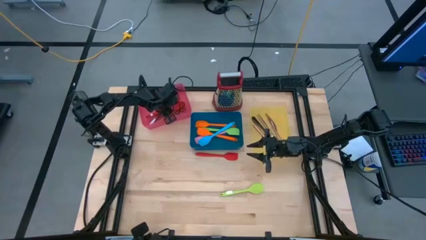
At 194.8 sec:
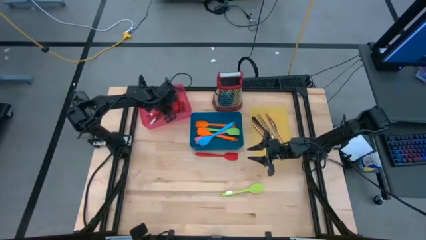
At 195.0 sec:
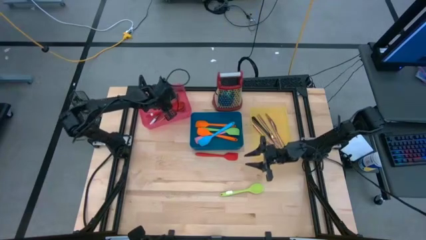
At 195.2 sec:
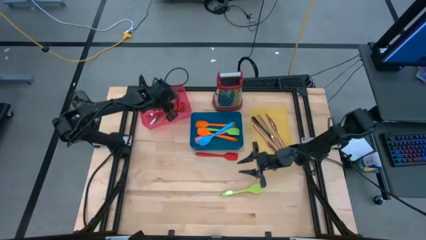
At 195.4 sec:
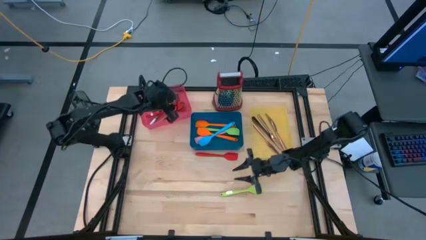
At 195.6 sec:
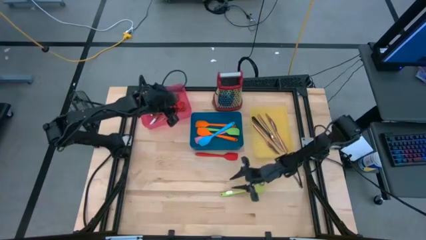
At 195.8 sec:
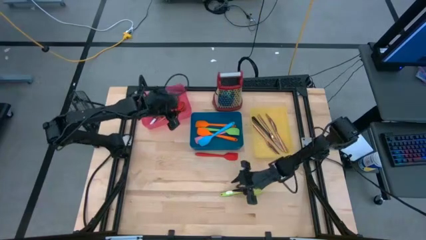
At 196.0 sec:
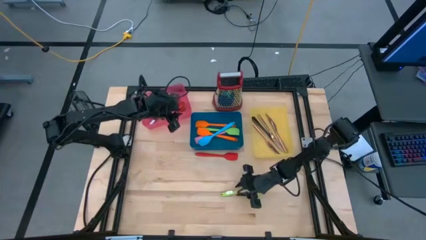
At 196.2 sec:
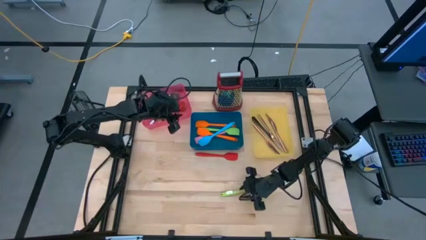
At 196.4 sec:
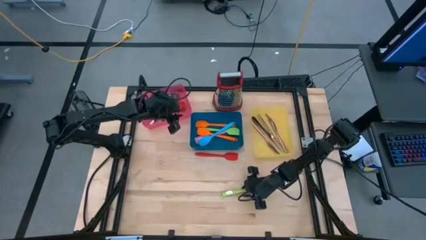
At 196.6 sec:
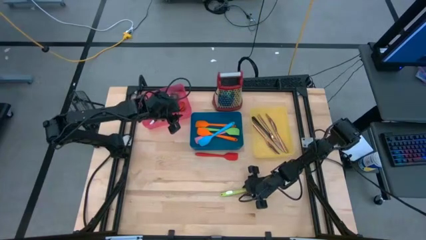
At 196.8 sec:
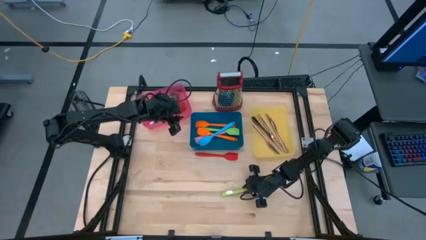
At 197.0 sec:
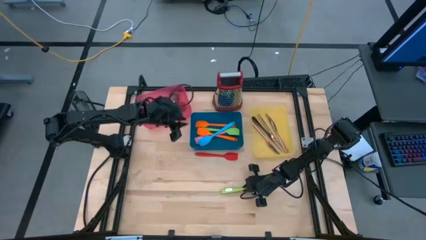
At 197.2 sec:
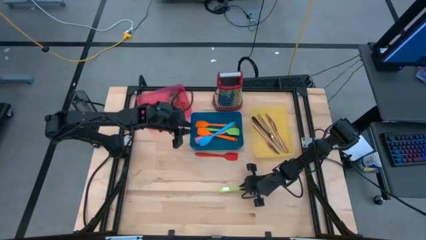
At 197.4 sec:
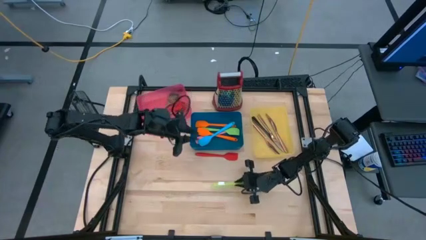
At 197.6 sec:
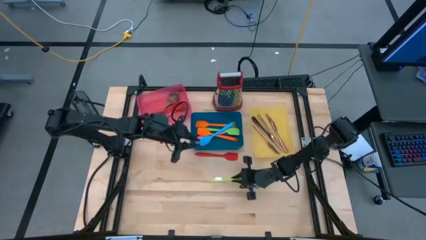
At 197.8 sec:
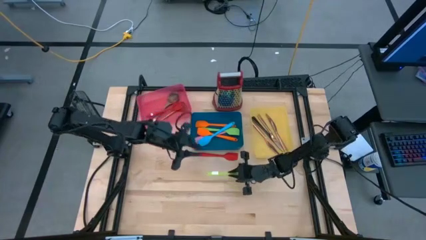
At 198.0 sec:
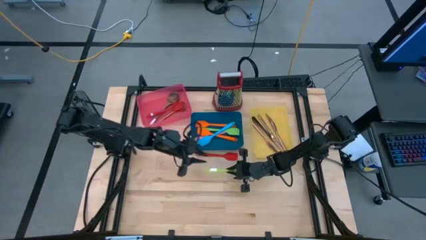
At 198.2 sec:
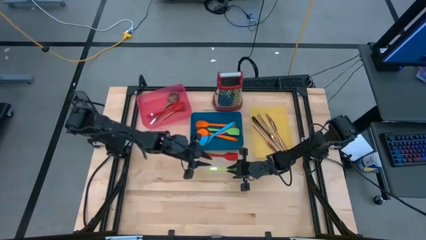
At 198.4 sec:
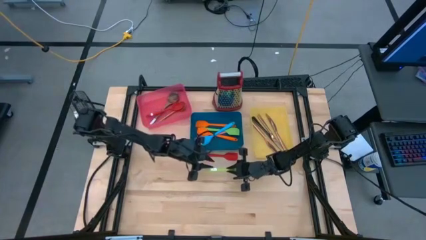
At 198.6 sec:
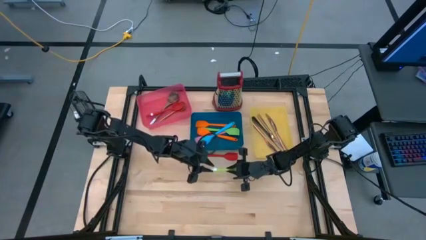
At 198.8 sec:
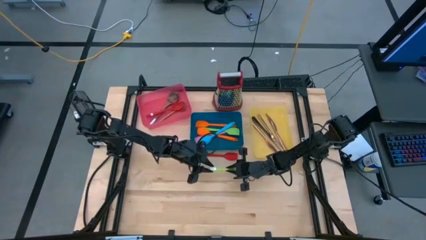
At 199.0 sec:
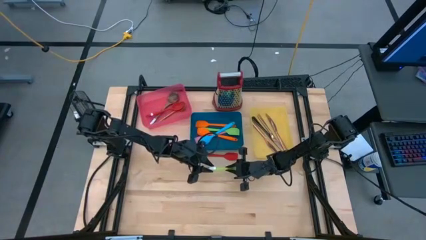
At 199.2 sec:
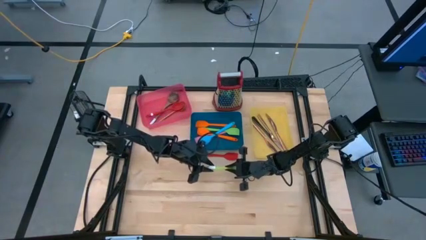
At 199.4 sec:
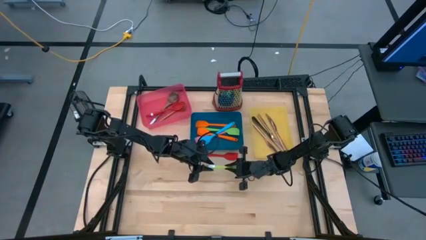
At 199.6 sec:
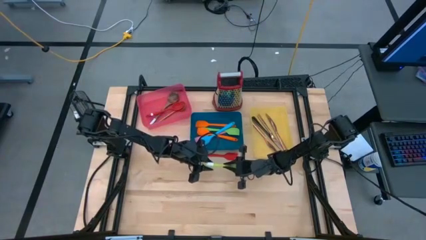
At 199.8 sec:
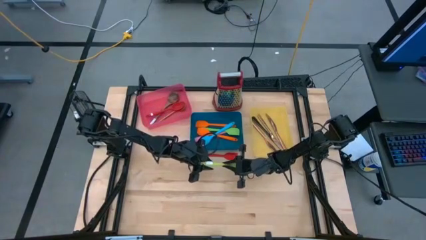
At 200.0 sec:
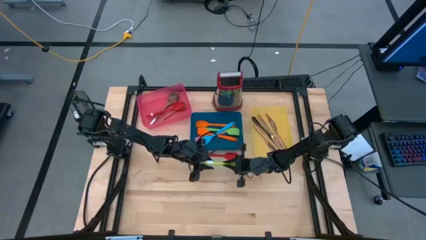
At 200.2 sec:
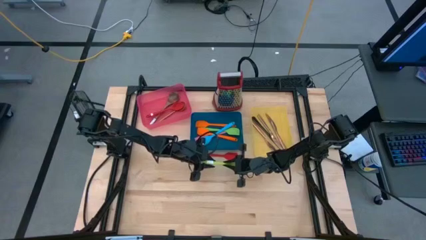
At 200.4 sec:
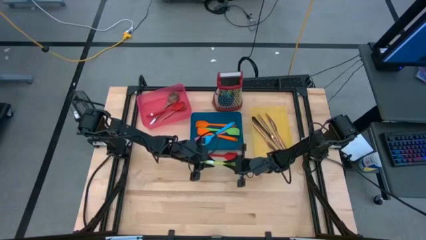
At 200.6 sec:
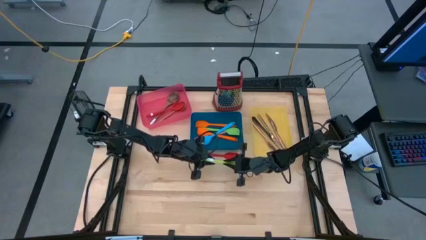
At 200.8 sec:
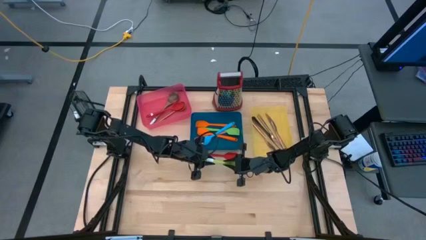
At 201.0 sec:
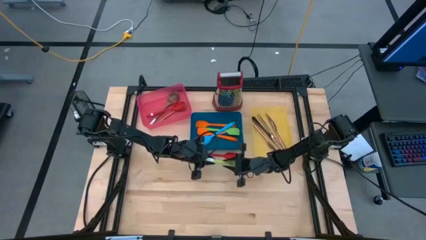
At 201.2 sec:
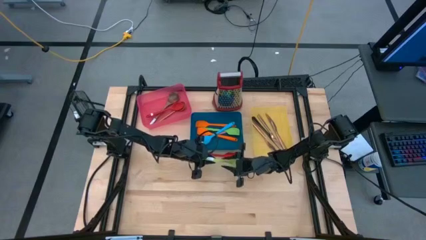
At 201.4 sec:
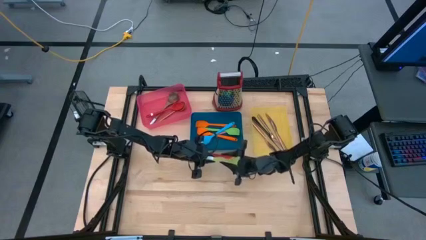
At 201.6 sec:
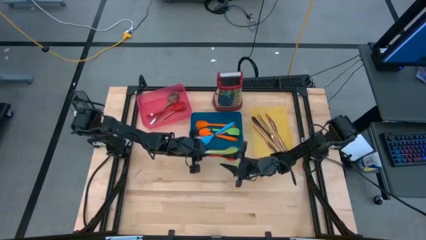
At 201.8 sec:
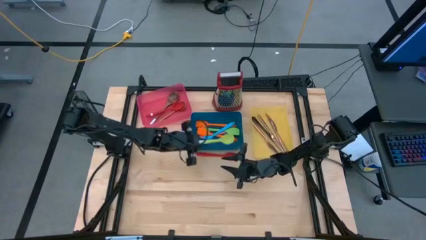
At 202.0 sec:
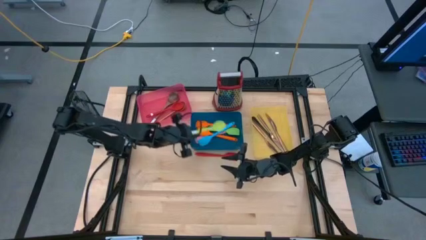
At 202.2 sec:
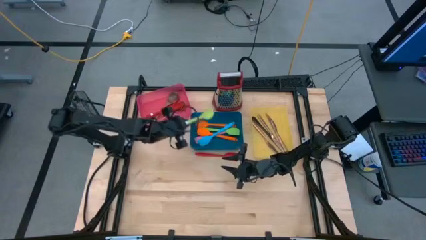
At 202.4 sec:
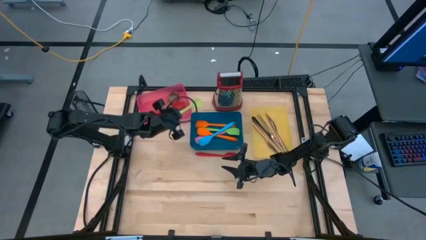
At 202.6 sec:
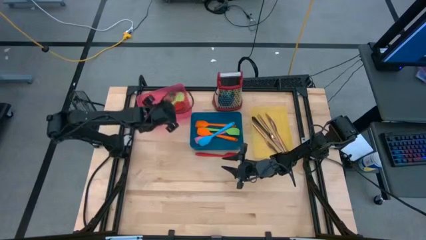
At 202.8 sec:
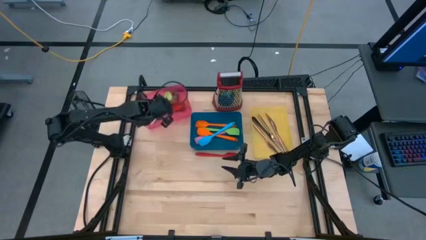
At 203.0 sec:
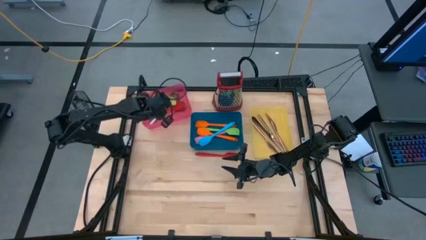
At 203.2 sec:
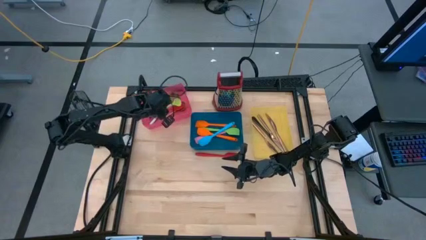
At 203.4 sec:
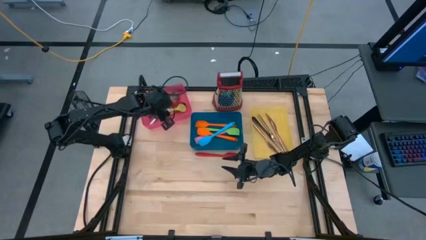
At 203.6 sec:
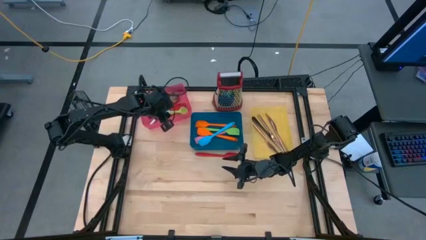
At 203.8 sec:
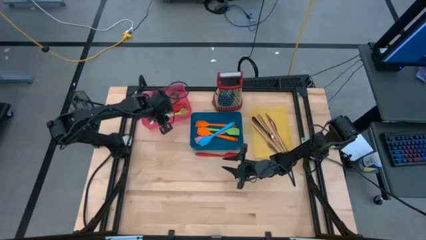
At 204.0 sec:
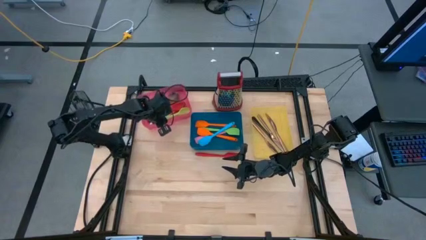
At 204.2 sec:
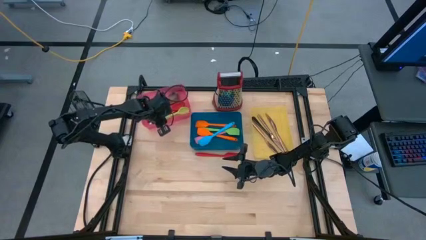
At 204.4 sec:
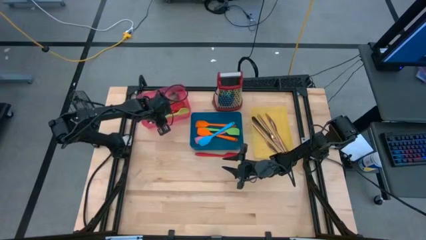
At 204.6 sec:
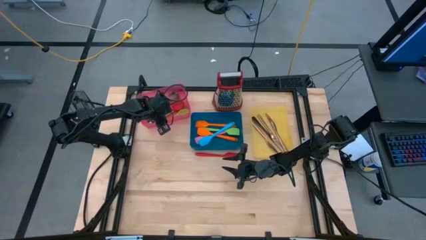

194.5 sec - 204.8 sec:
Task: Pick & Place Kitchen Items
Put the light green serving spoon into the pink bin

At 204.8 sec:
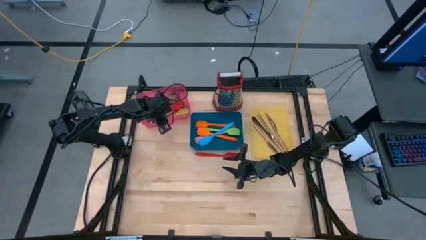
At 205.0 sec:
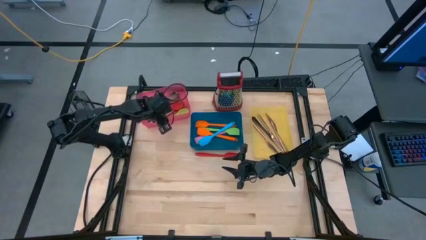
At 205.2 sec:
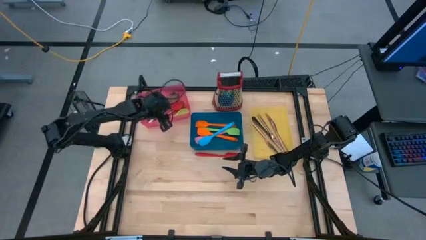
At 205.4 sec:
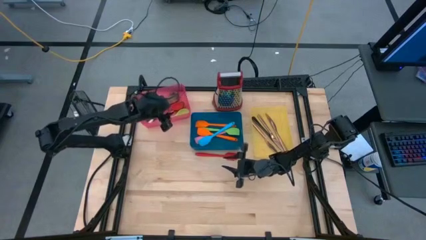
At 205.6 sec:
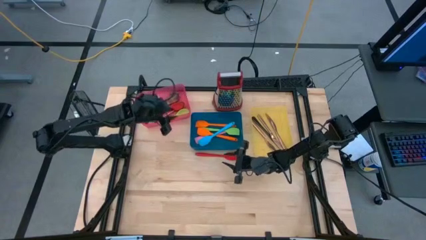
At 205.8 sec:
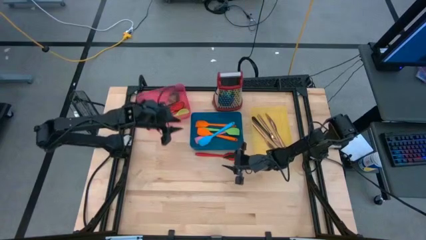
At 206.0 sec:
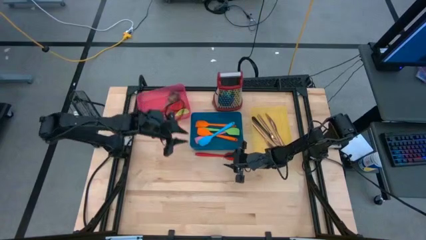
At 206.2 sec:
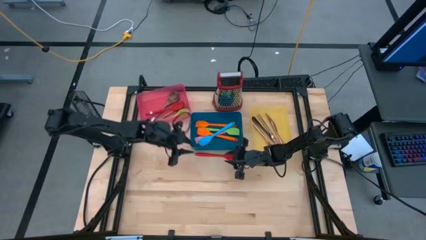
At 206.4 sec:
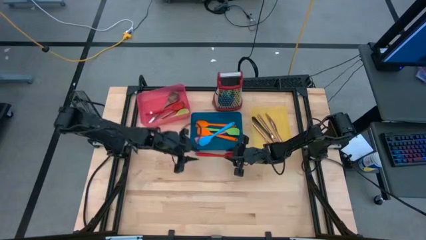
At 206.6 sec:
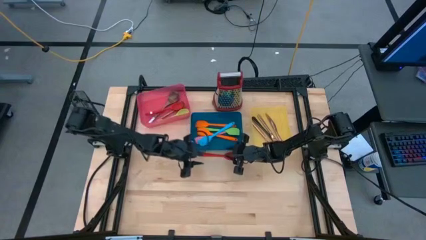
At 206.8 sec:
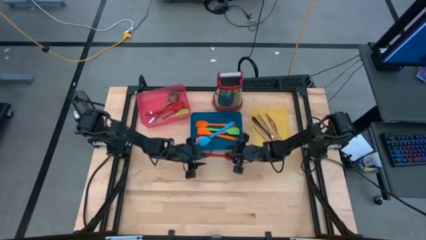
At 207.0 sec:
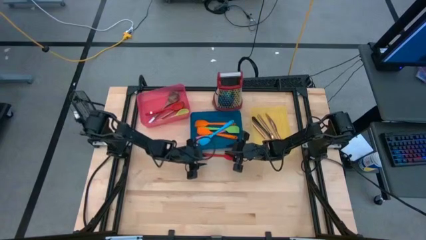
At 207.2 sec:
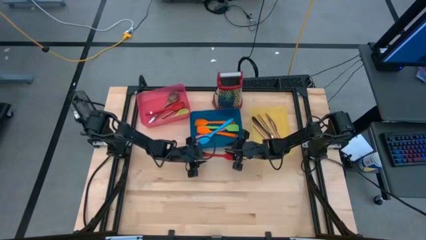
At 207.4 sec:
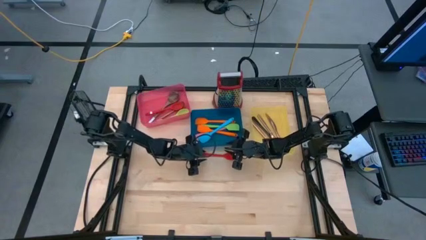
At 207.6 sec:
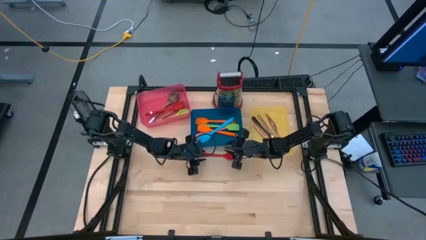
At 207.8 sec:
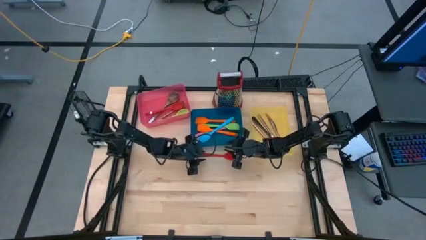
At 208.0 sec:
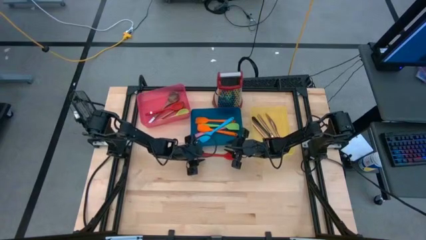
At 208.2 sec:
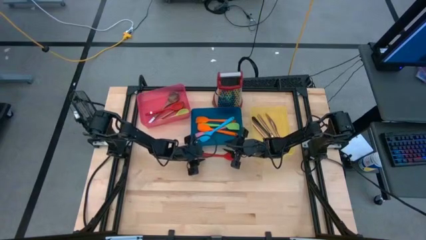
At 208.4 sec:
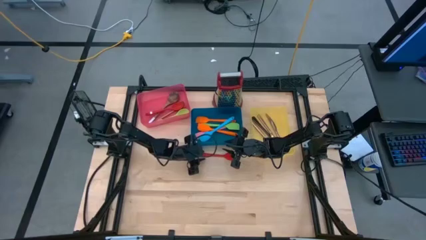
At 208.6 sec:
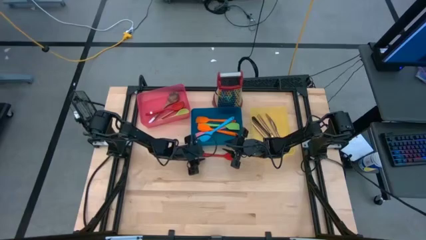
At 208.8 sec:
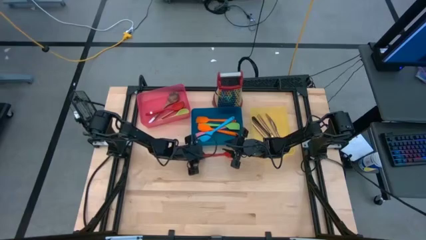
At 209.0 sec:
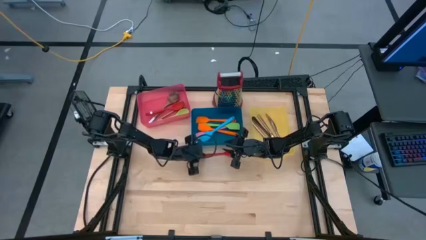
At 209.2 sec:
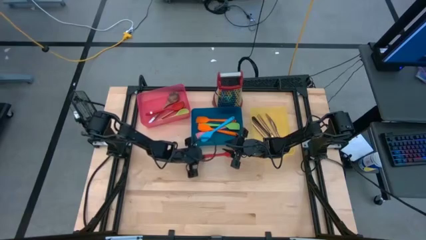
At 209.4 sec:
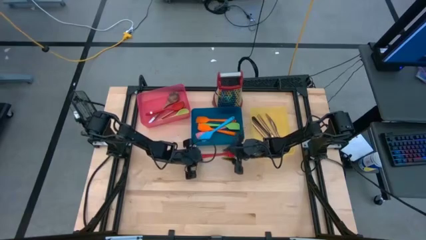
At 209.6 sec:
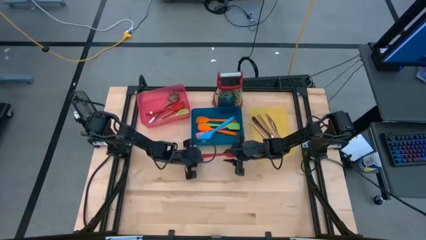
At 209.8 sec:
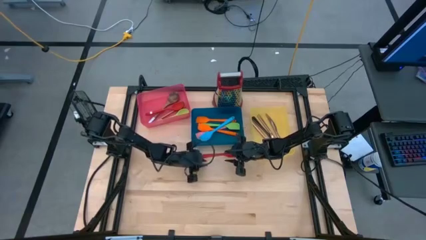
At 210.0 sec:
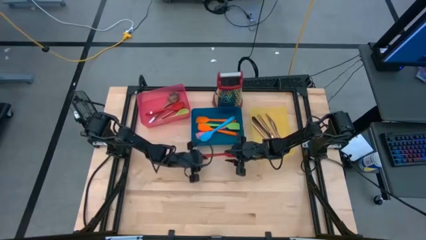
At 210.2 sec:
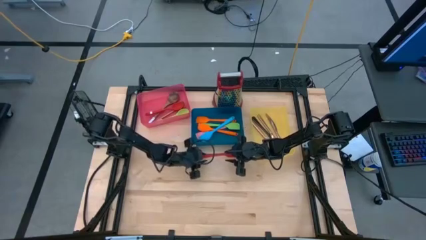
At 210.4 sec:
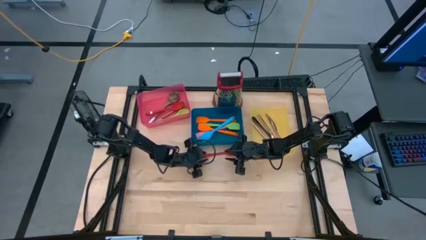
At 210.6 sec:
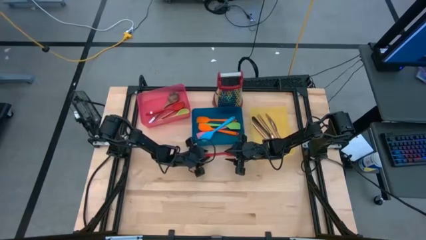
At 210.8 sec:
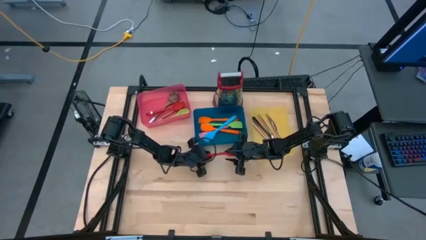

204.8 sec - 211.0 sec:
Put the red spatula into the blue bin
